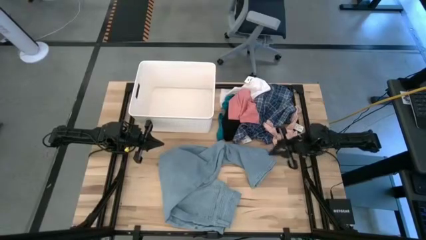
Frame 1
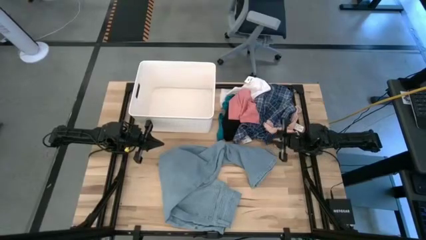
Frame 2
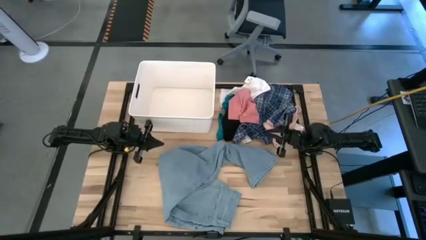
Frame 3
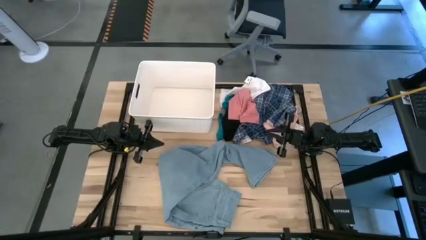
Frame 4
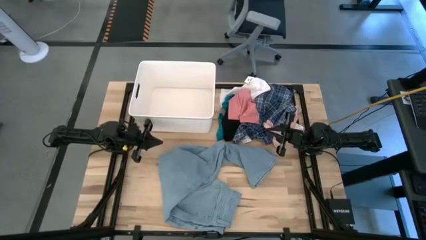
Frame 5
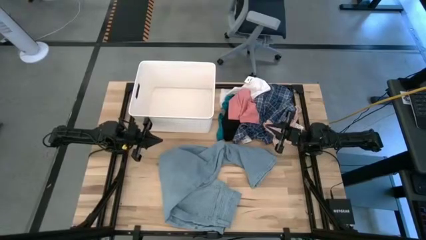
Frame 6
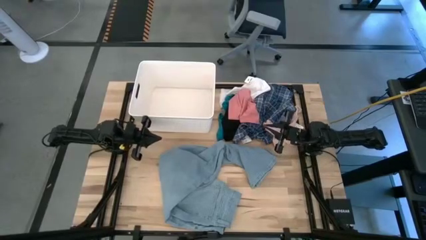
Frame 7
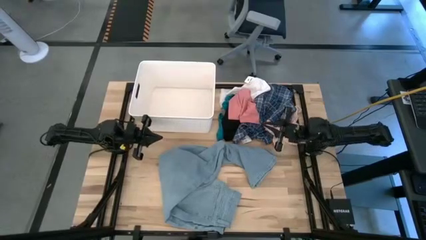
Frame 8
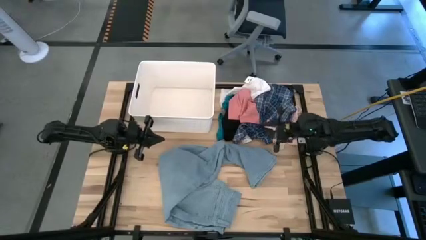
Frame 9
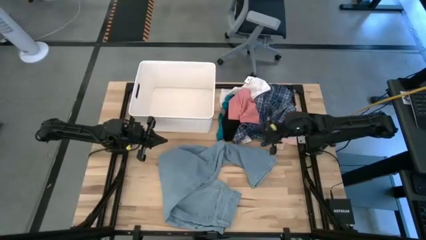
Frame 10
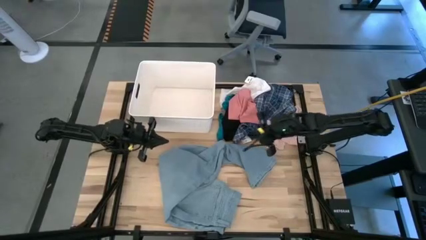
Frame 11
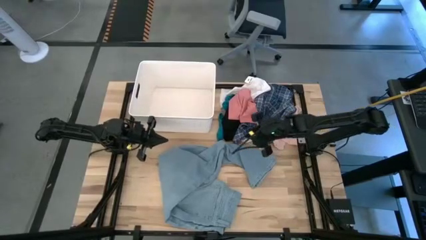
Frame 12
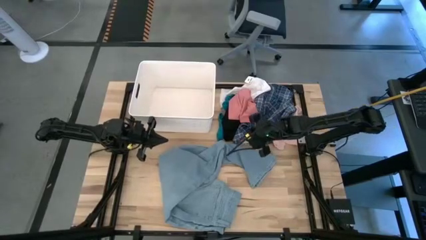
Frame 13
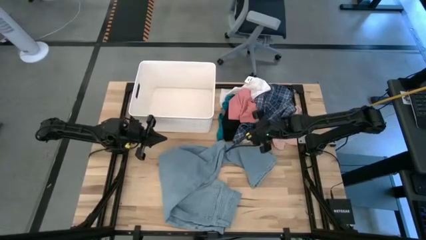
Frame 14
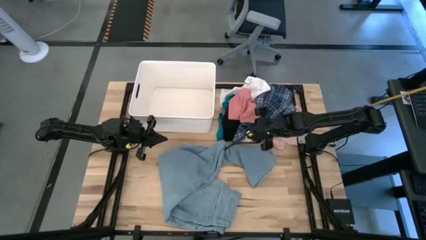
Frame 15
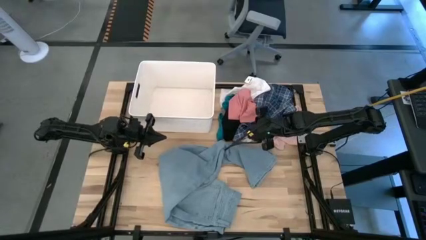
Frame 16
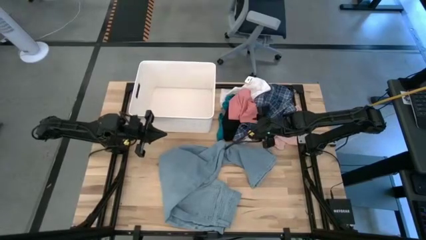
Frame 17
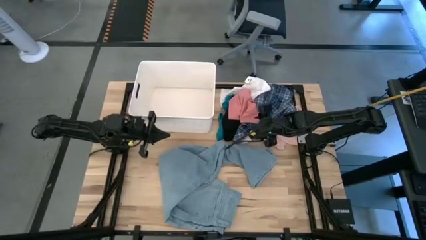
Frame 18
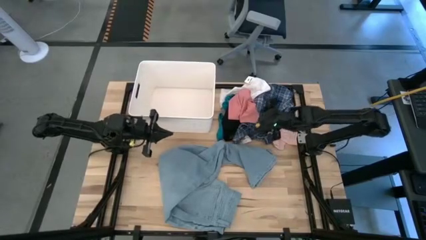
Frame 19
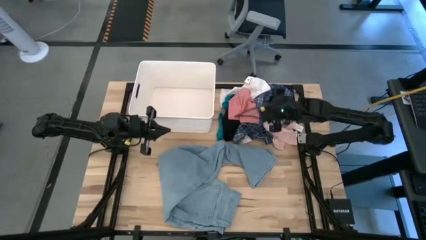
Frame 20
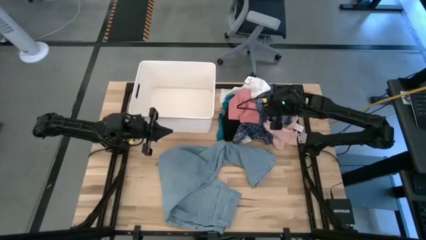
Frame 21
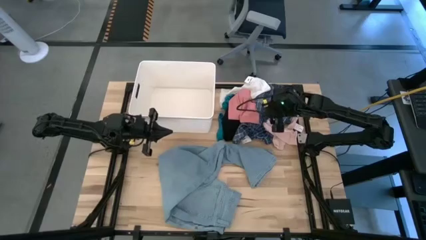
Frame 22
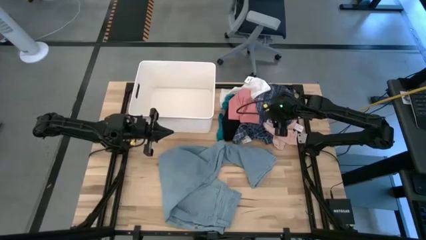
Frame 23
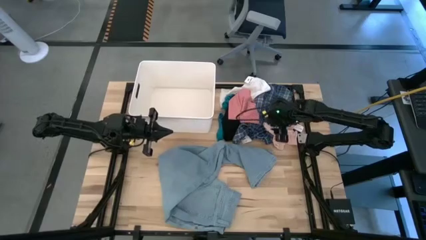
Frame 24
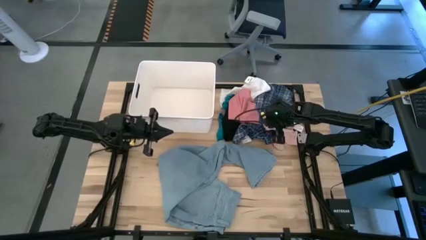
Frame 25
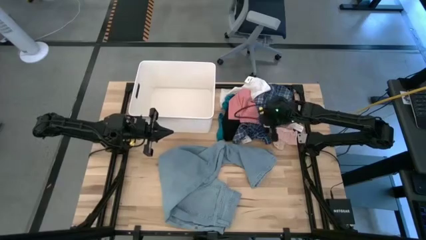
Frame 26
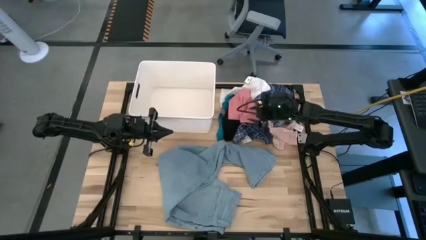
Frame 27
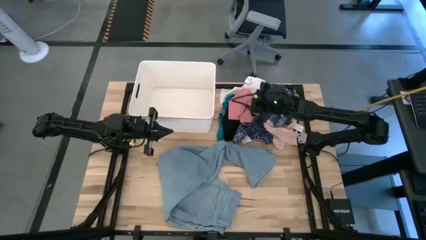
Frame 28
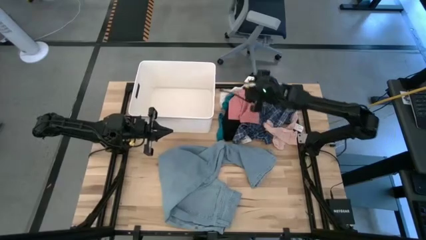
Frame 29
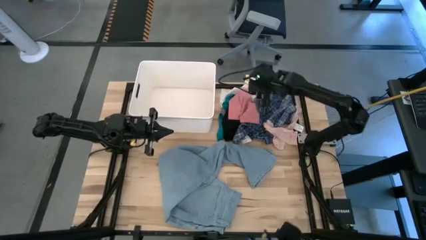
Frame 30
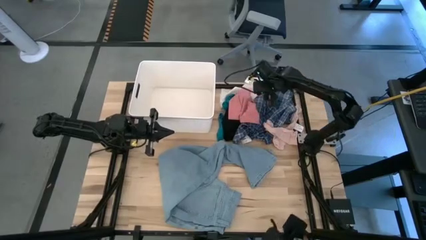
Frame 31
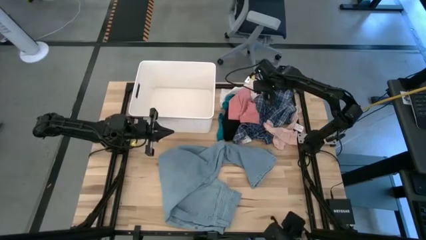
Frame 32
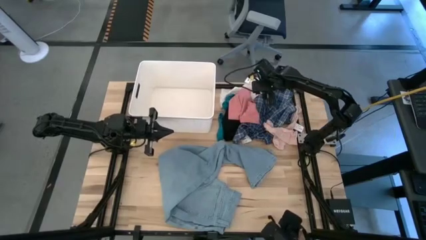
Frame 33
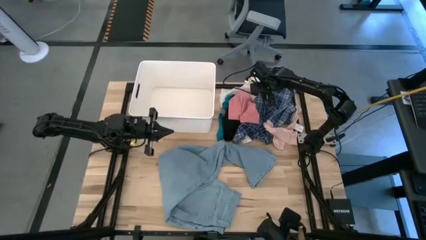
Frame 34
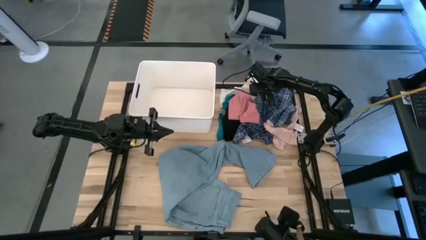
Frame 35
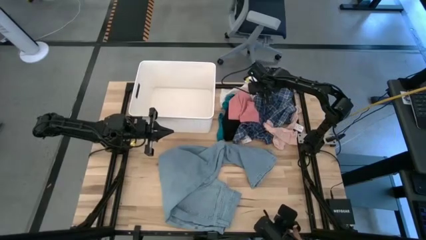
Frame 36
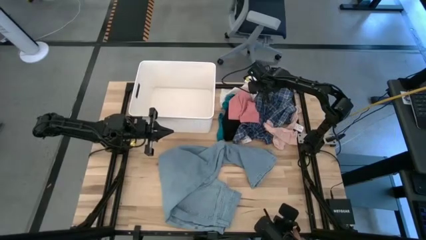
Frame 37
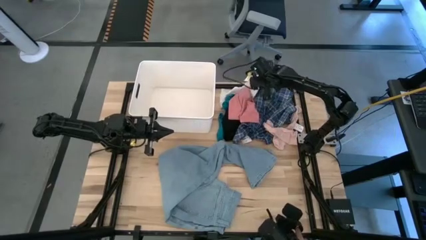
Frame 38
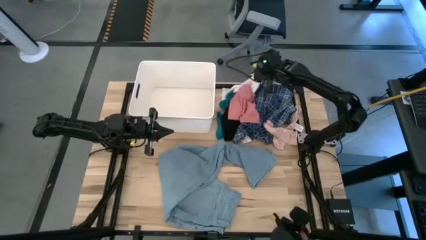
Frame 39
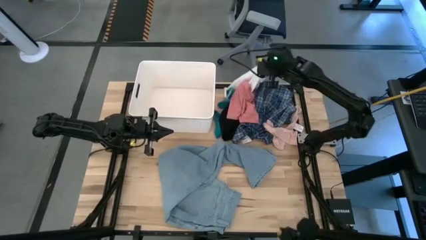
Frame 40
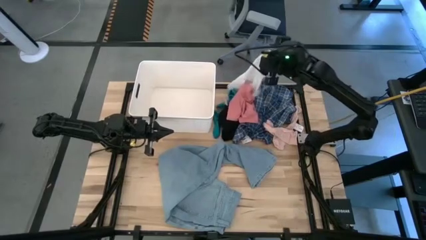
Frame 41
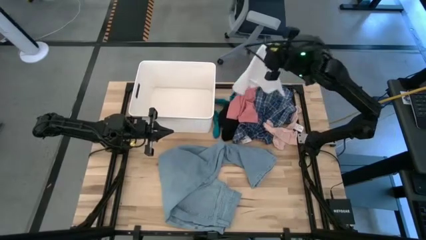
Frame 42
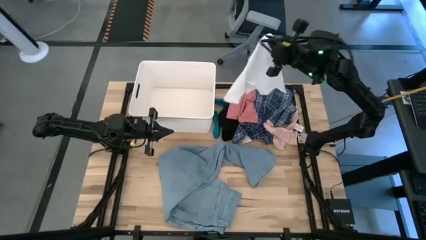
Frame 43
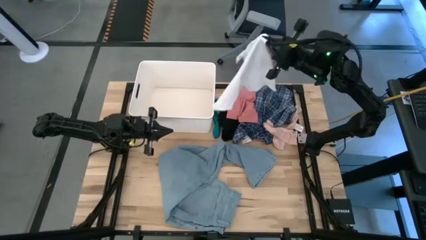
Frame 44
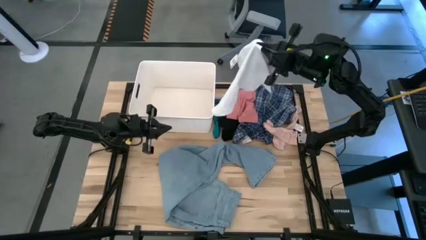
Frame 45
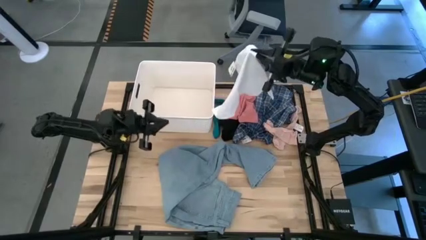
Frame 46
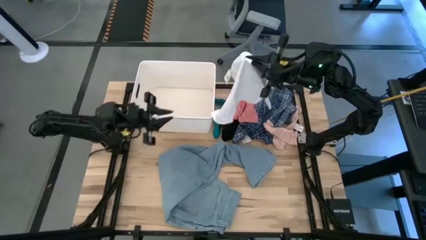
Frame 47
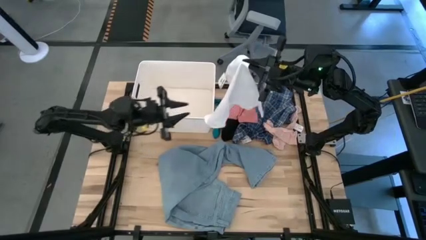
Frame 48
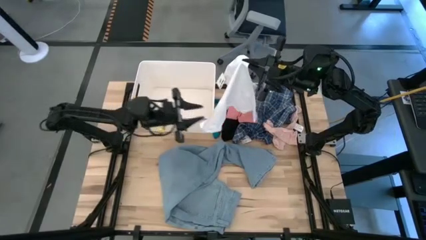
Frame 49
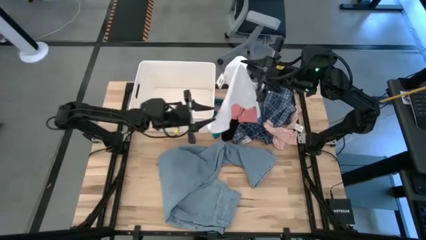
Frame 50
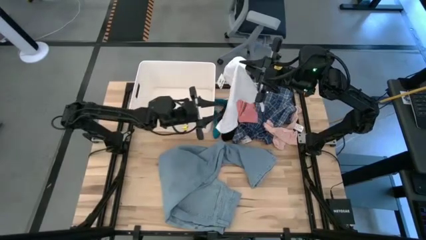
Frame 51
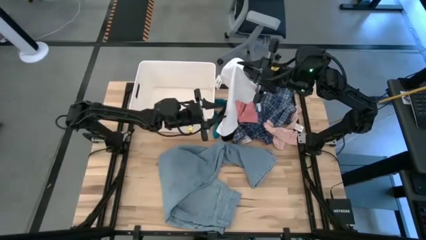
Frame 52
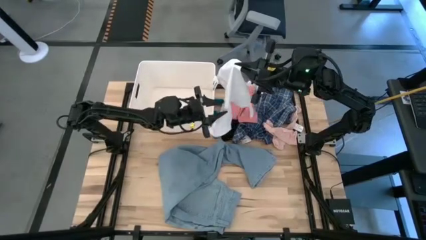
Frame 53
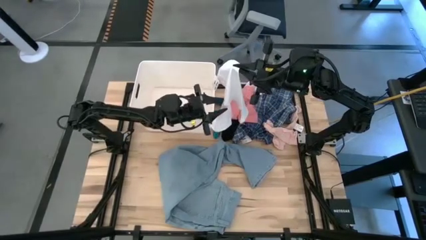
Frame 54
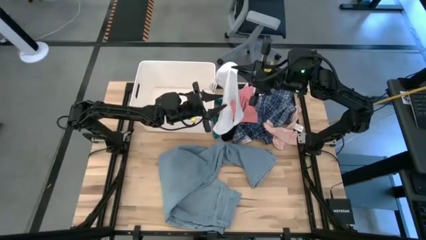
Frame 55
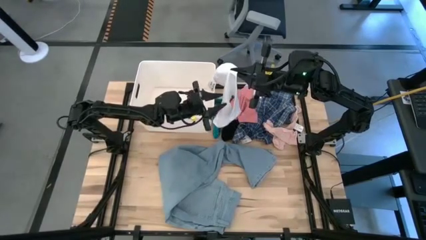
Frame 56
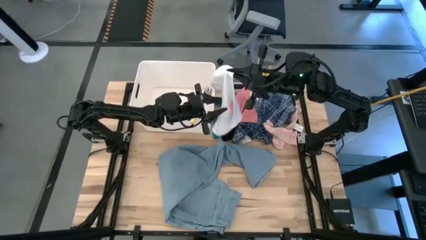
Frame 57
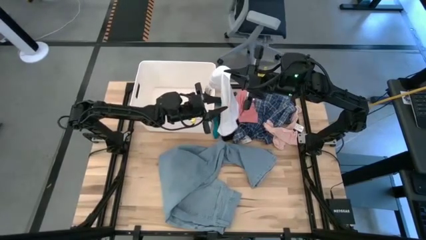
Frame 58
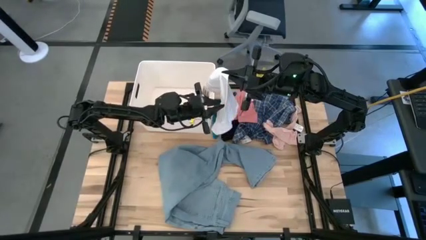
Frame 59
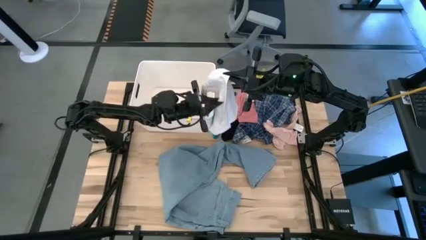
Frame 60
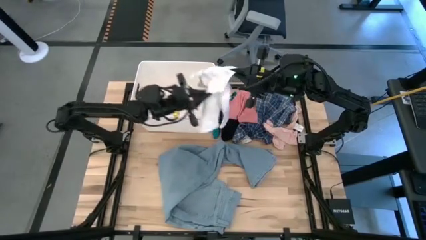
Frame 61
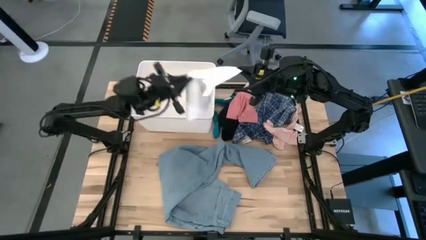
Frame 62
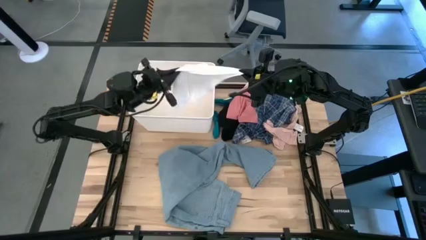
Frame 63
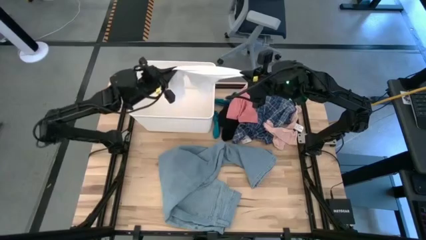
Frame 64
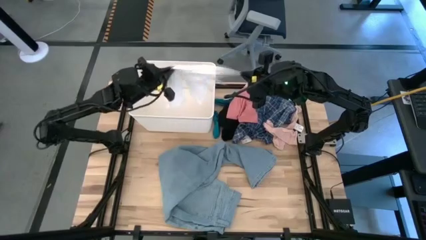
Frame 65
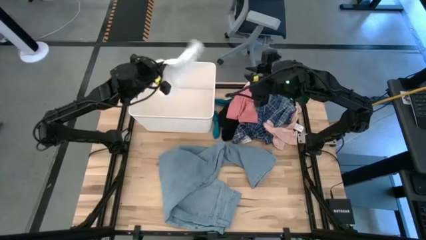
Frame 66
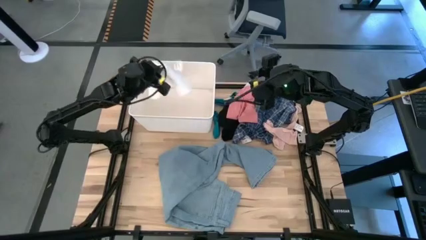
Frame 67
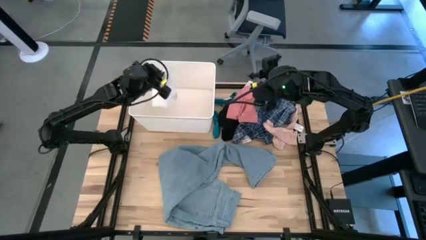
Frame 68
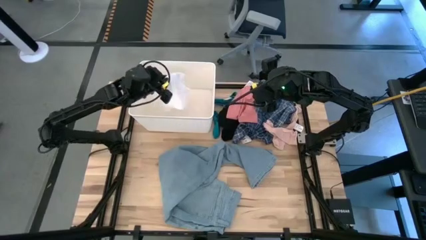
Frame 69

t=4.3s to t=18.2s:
Task: Sort clothes
Put the white shorts into the white bin
